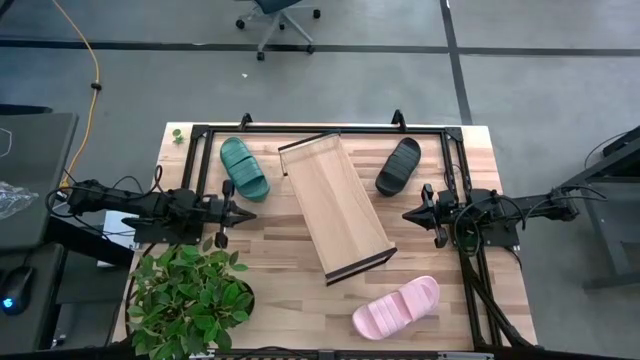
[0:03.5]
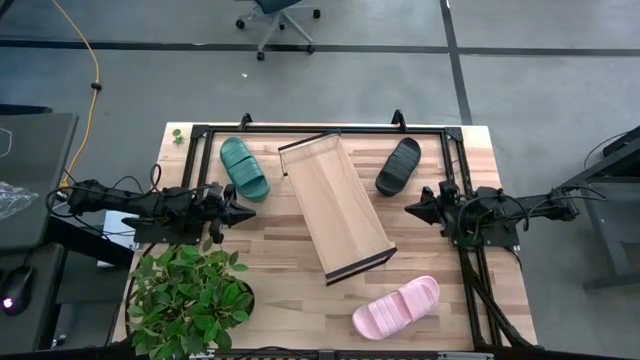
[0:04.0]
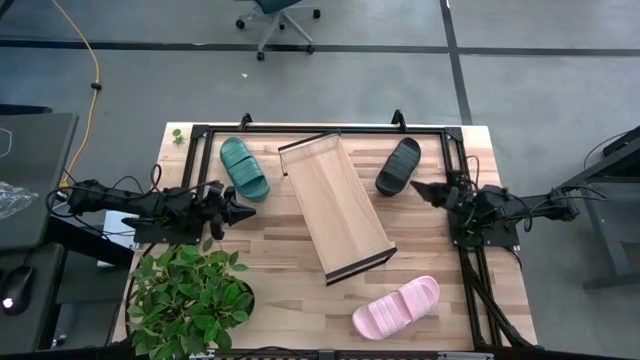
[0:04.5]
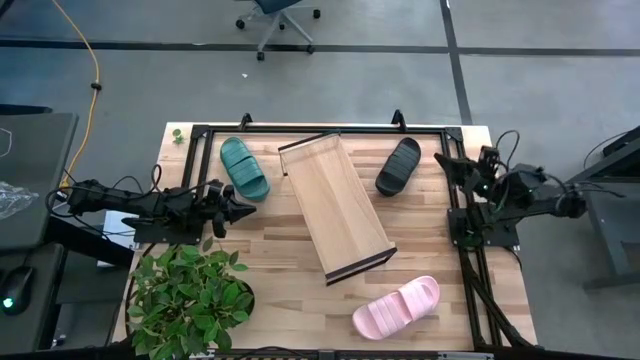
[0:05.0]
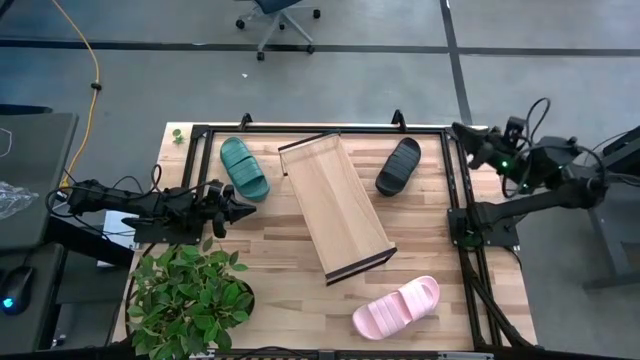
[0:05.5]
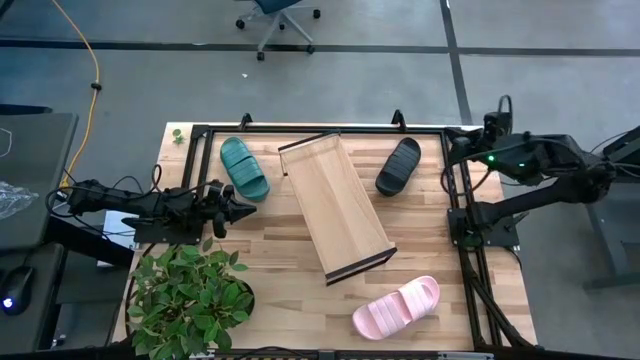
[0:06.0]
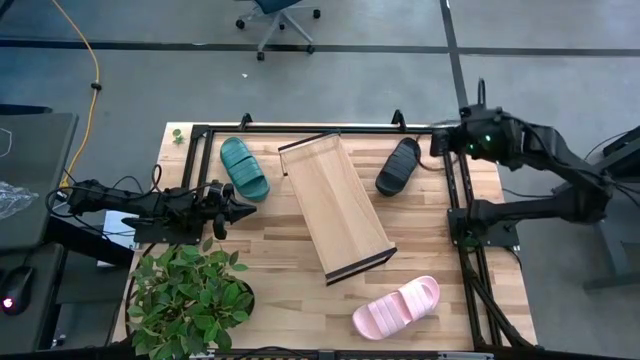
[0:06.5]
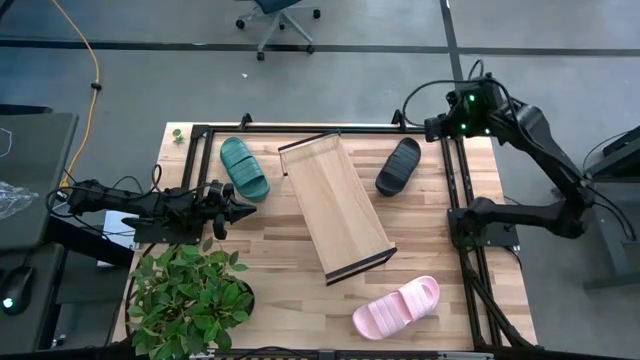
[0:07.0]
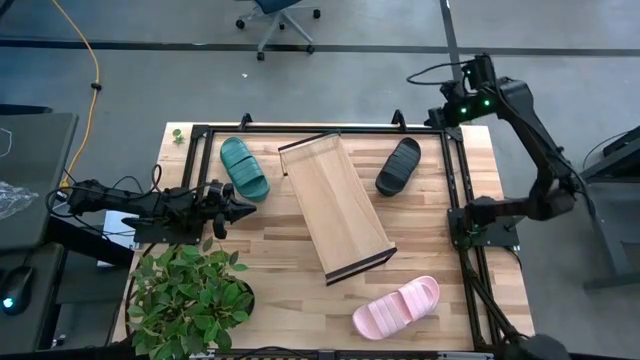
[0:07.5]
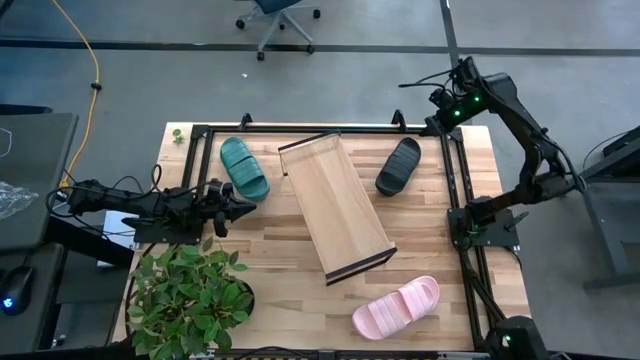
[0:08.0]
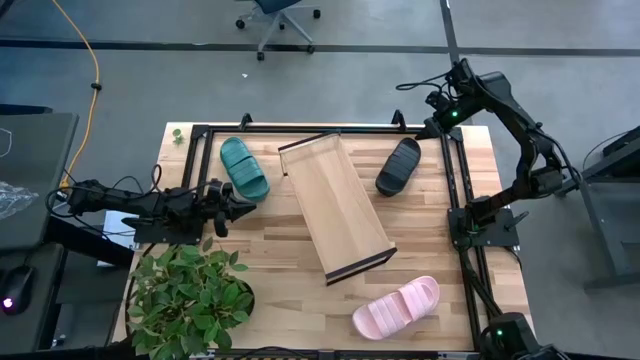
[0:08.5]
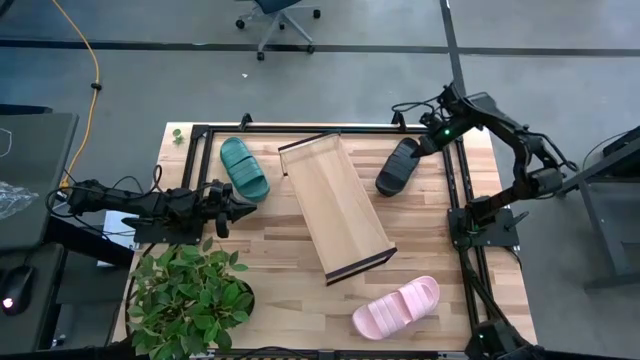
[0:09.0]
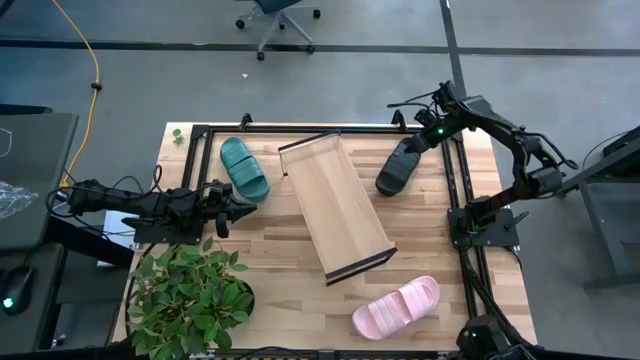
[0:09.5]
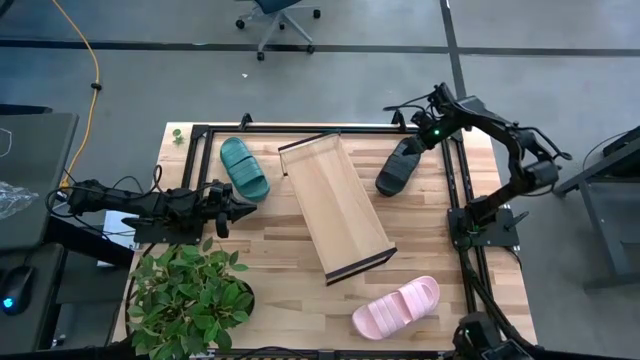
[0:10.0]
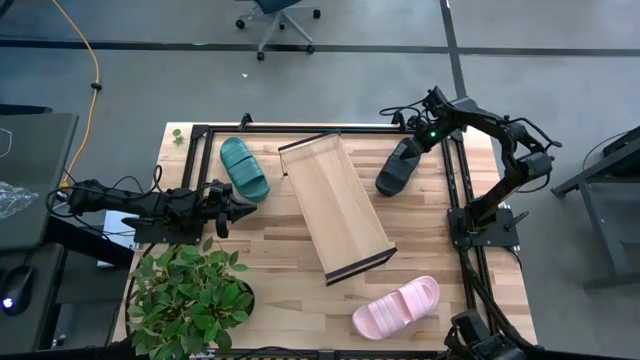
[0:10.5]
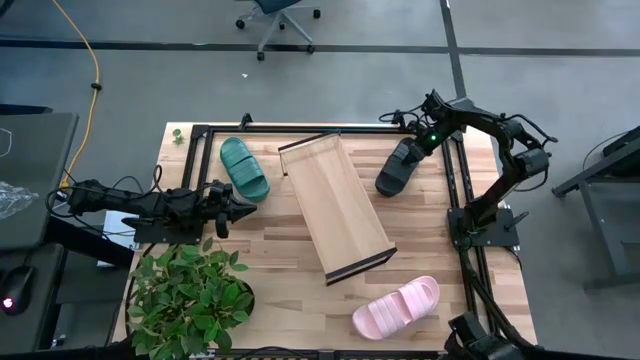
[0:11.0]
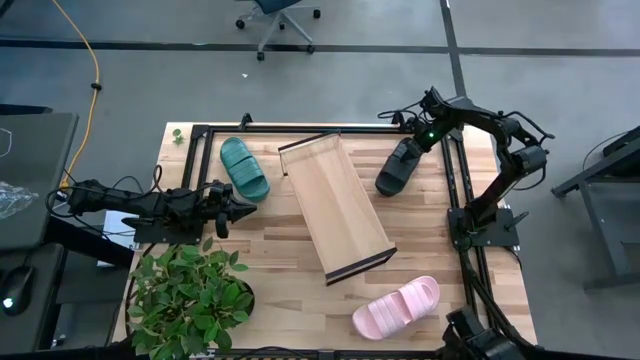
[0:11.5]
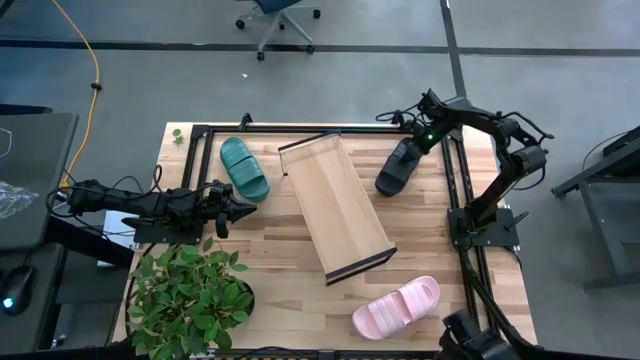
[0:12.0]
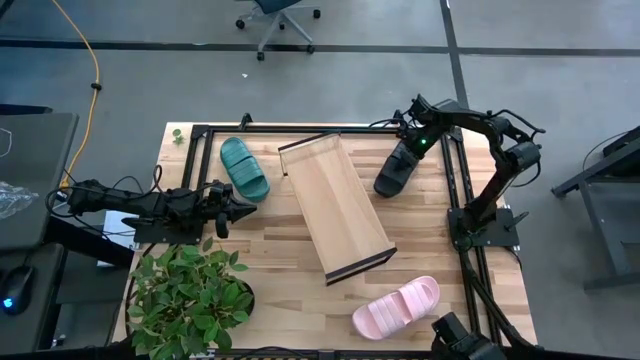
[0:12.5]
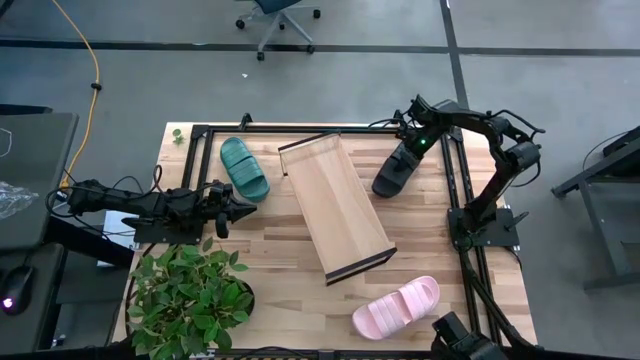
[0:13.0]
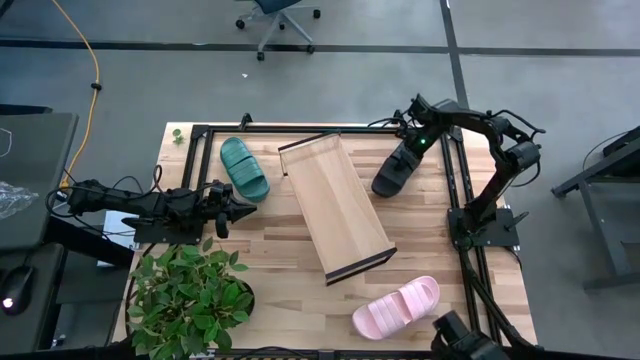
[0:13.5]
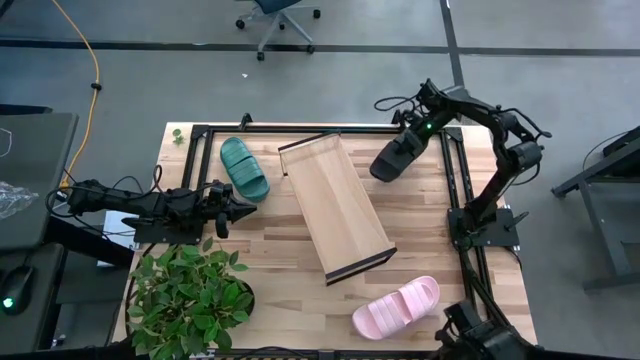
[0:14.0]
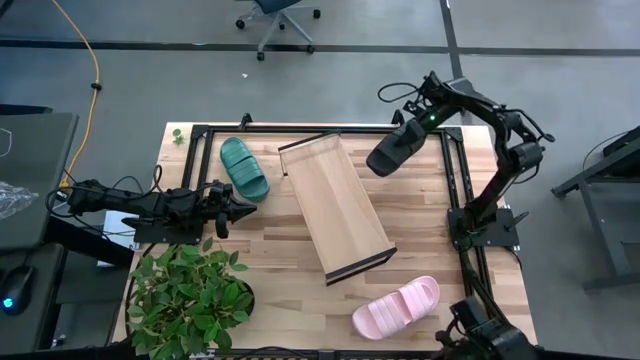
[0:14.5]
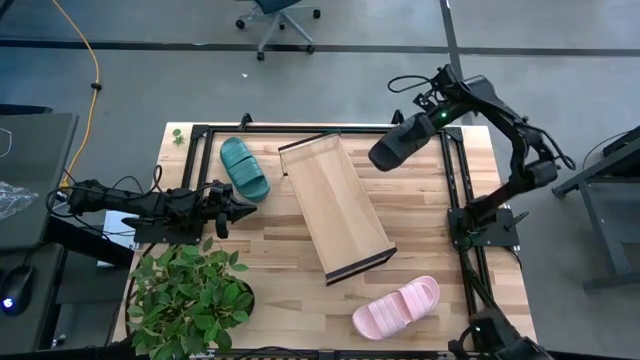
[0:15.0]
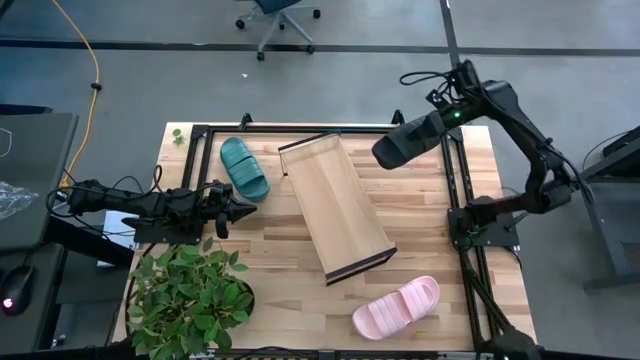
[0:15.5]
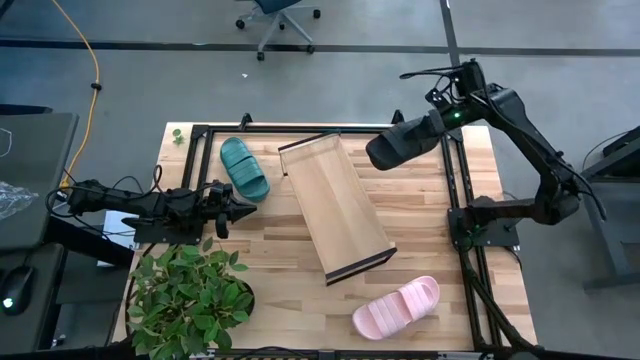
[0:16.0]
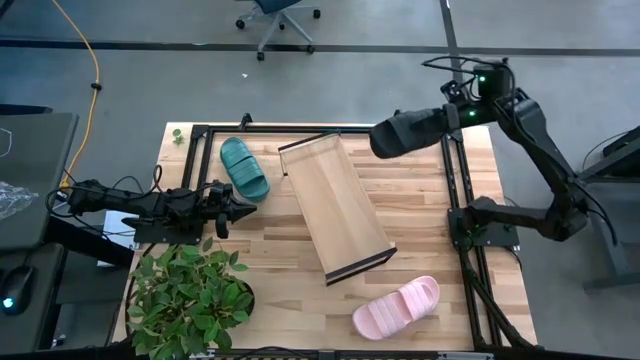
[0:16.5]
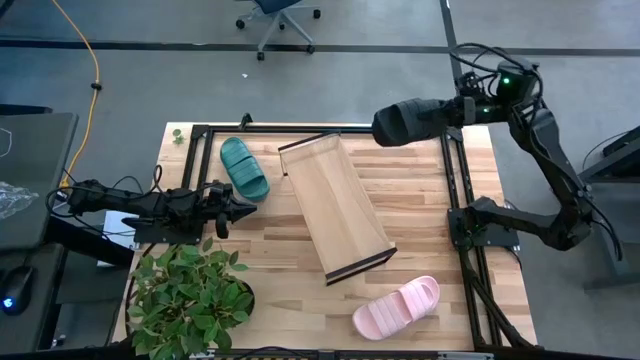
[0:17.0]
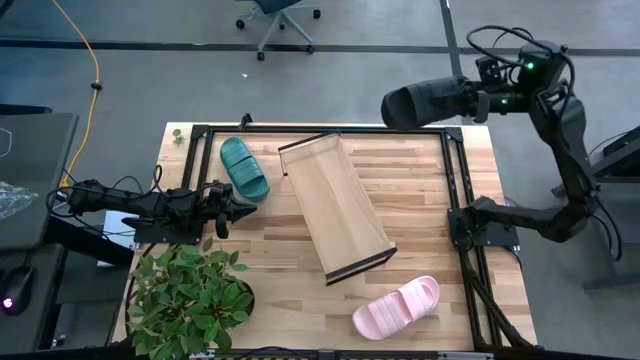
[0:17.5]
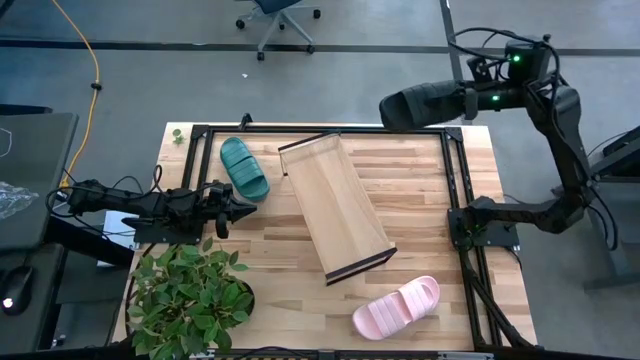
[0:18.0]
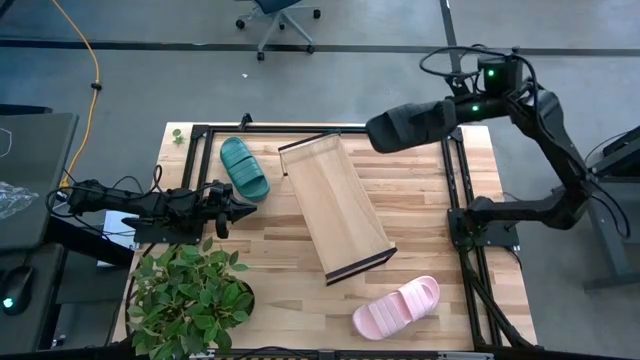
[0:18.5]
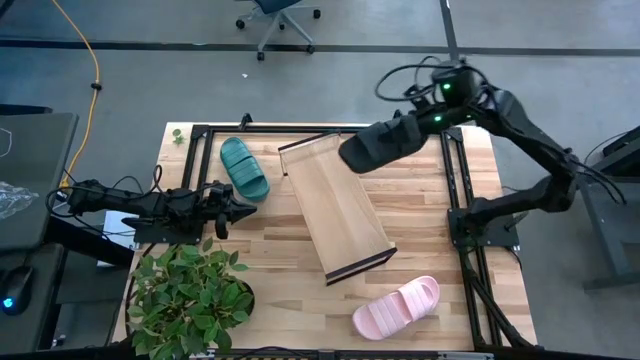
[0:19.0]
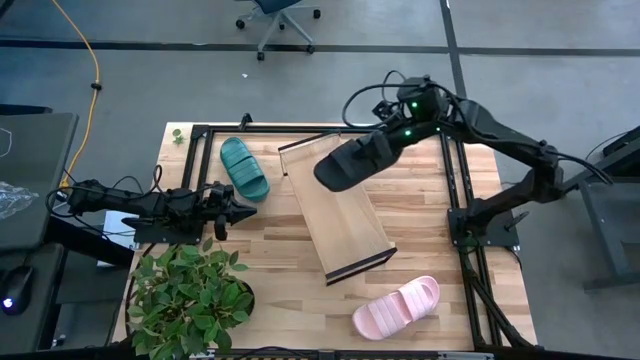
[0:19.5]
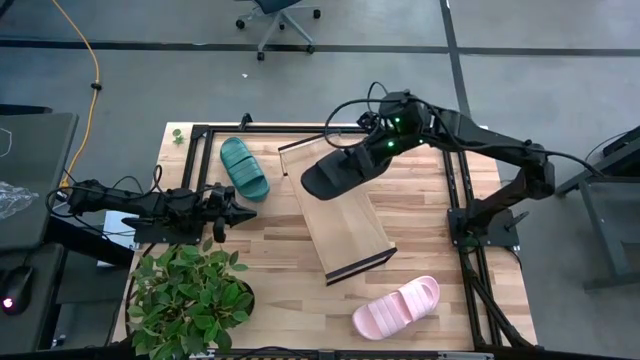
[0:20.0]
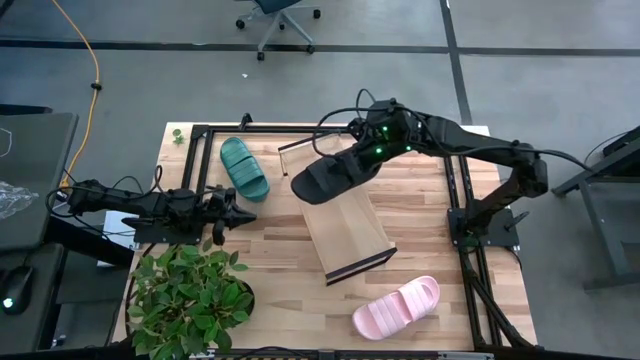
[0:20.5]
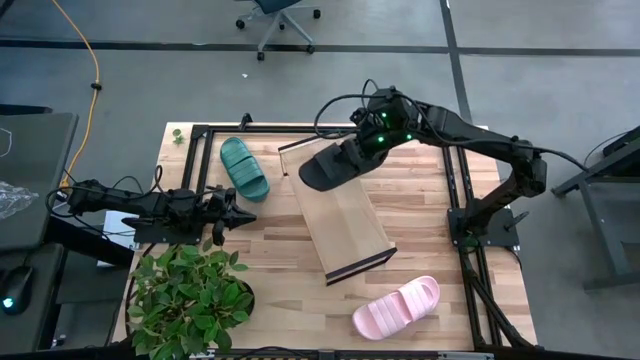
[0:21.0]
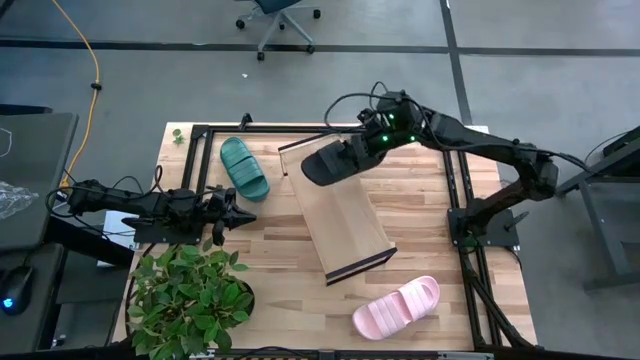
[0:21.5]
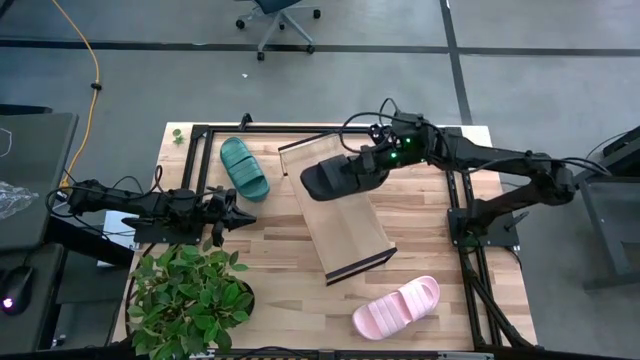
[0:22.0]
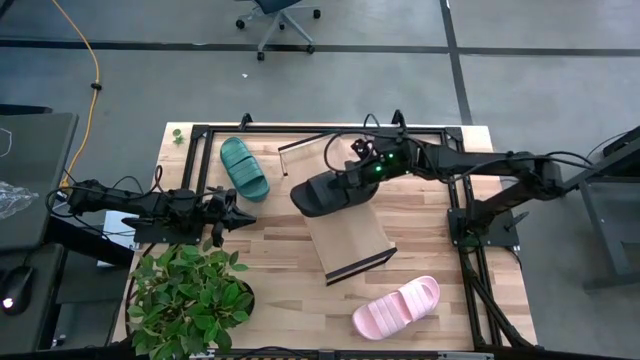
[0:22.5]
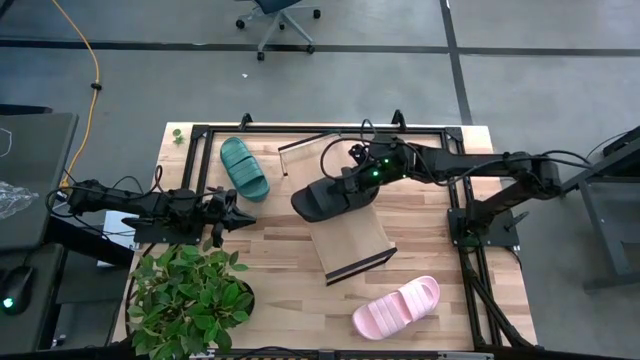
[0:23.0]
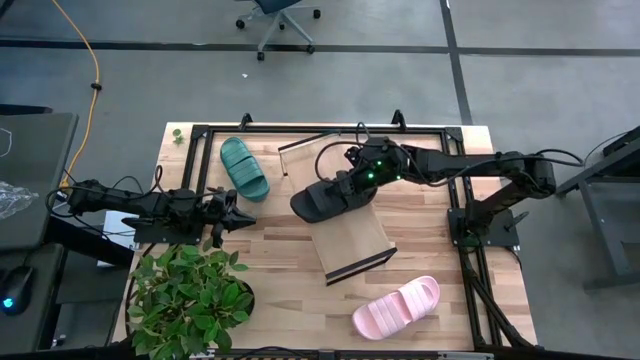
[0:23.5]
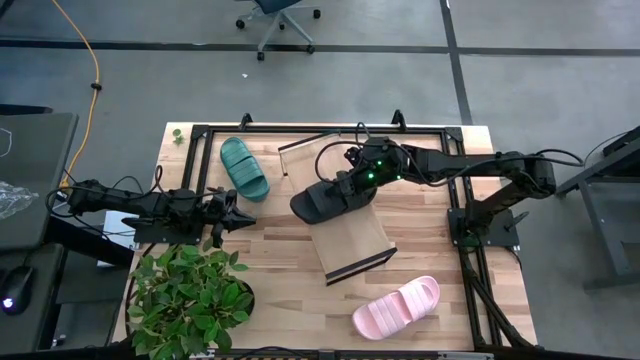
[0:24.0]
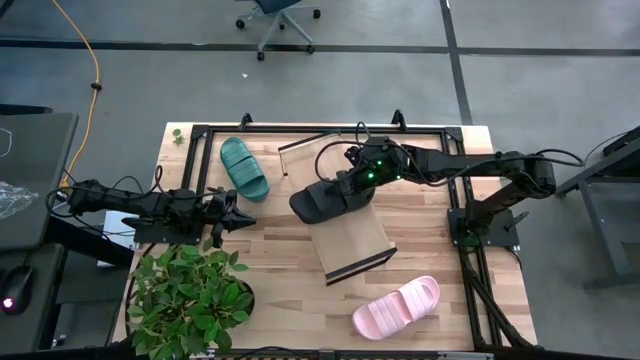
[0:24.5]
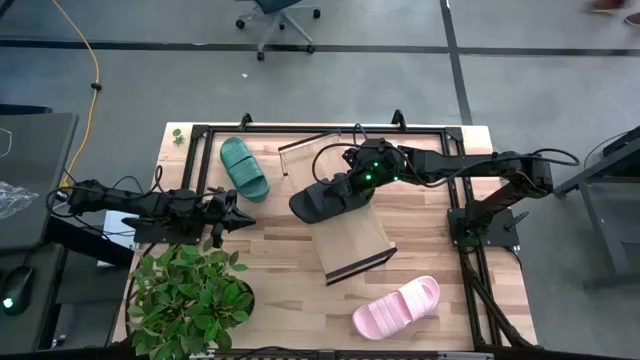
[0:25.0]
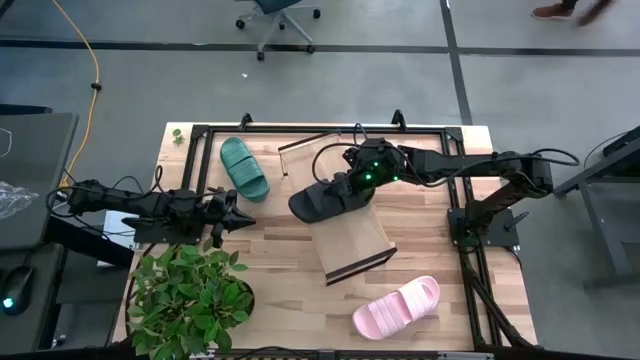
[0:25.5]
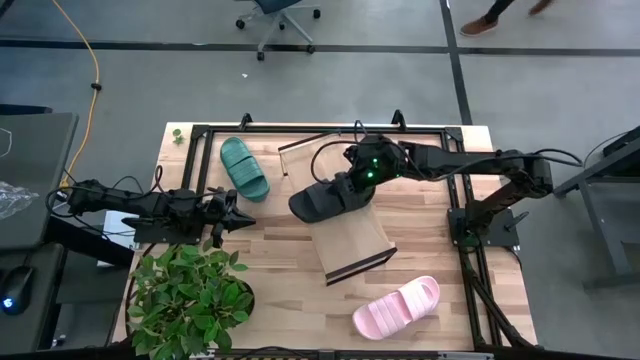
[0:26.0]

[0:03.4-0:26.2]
Task: Pick and place slides into the shelf
Put the black pair of slides on the shelf
